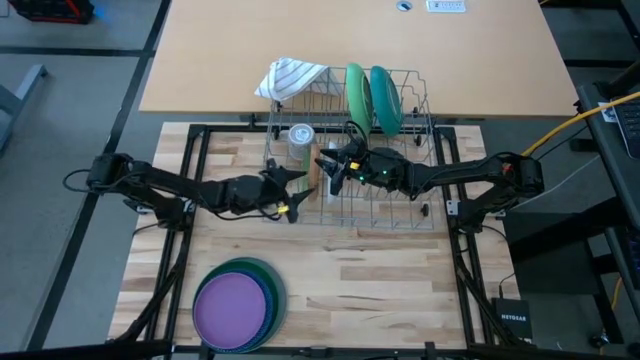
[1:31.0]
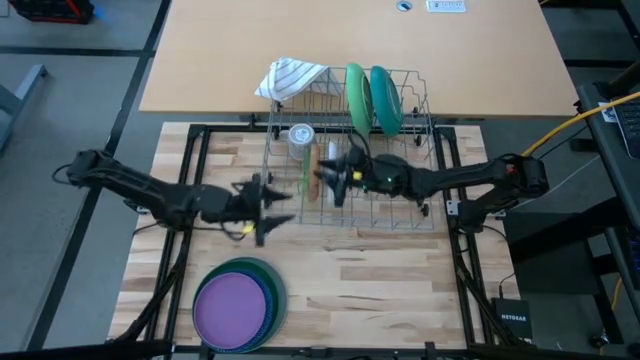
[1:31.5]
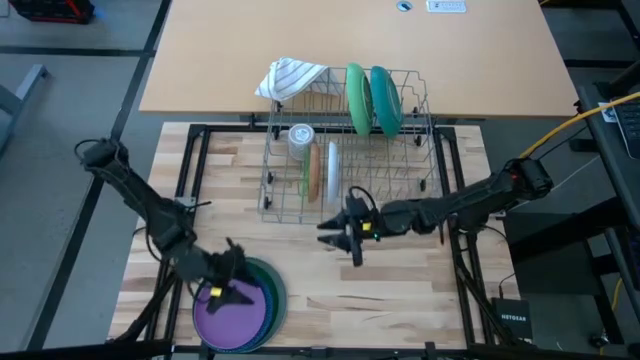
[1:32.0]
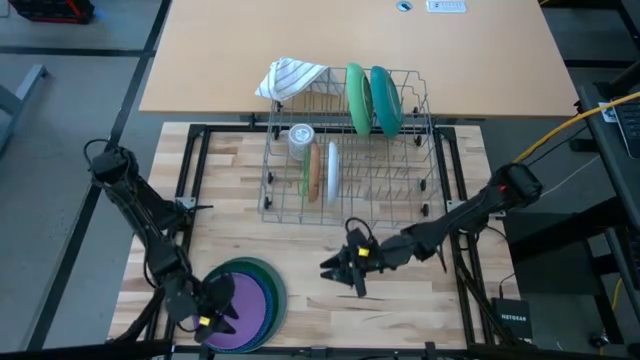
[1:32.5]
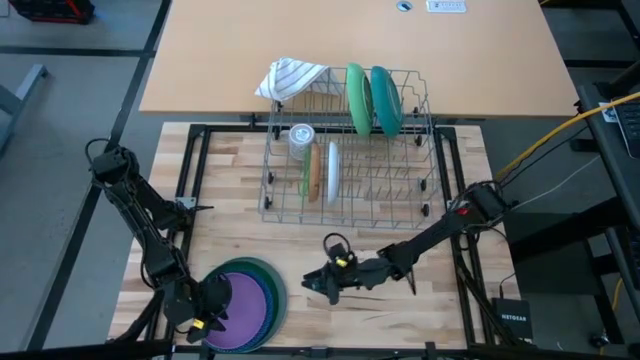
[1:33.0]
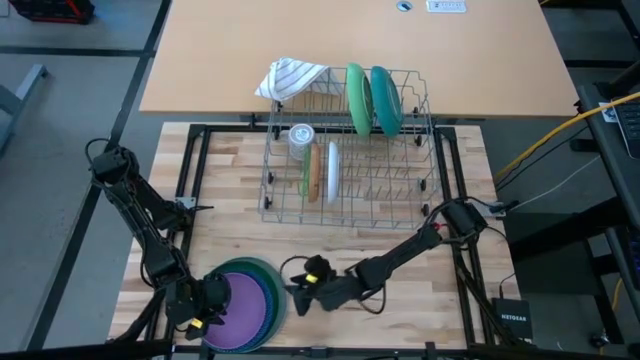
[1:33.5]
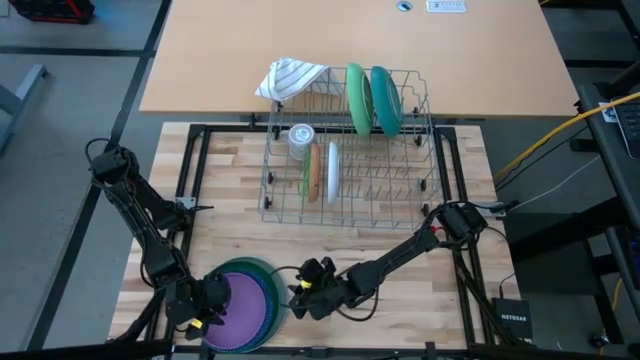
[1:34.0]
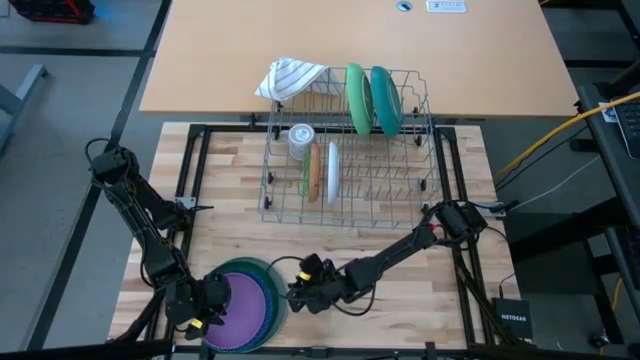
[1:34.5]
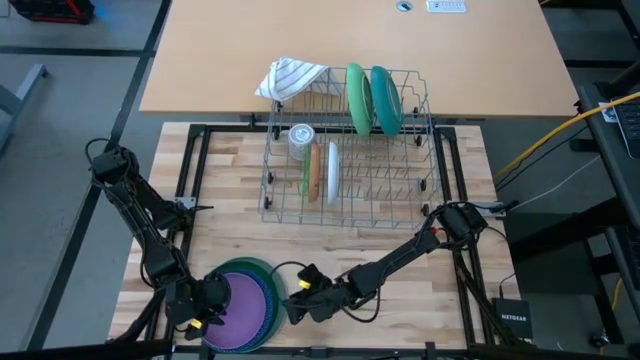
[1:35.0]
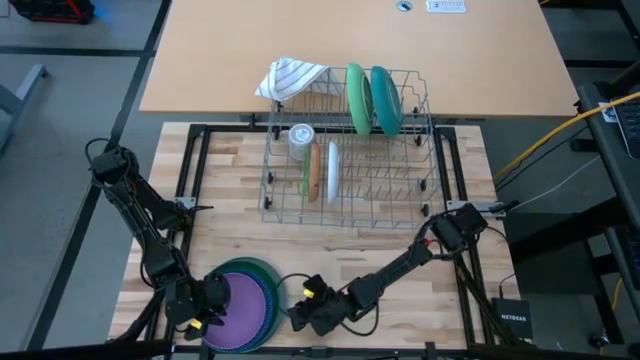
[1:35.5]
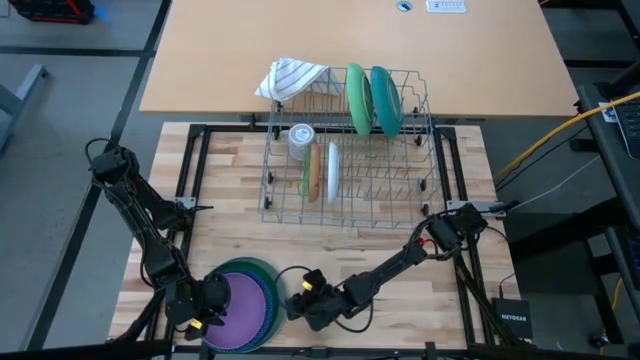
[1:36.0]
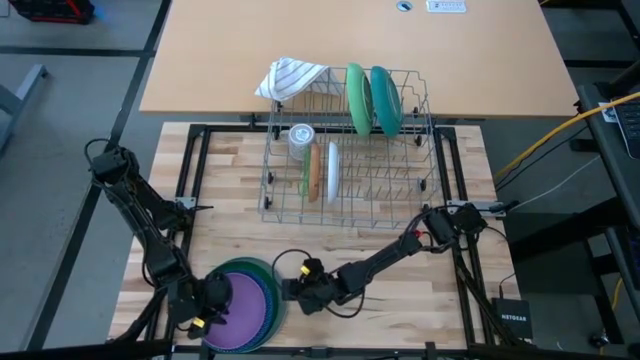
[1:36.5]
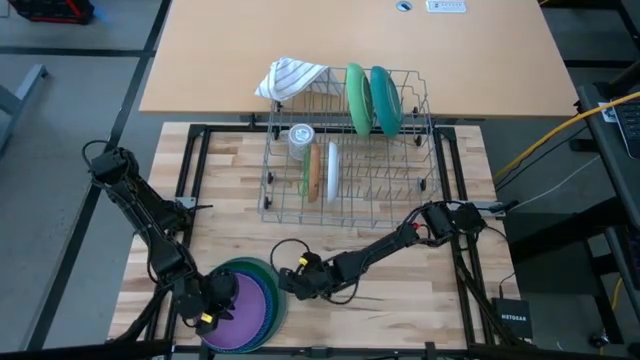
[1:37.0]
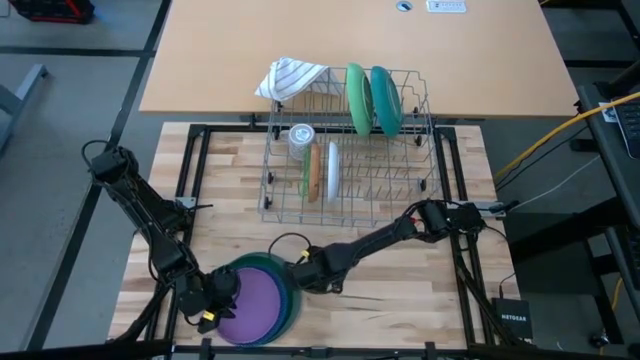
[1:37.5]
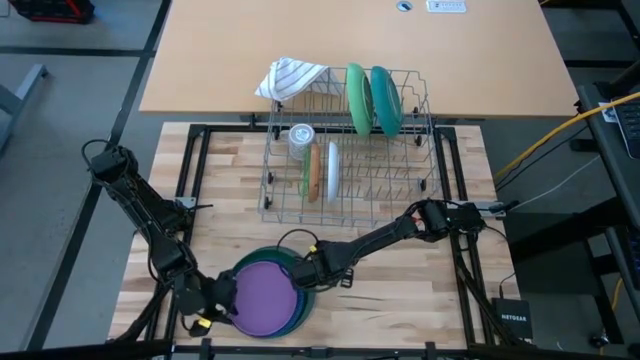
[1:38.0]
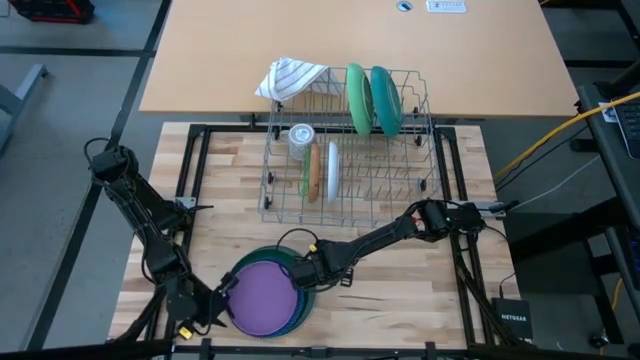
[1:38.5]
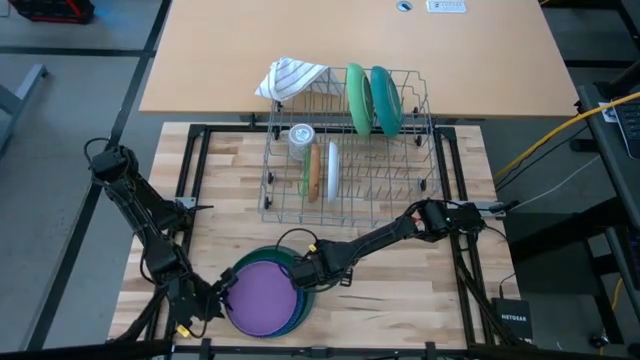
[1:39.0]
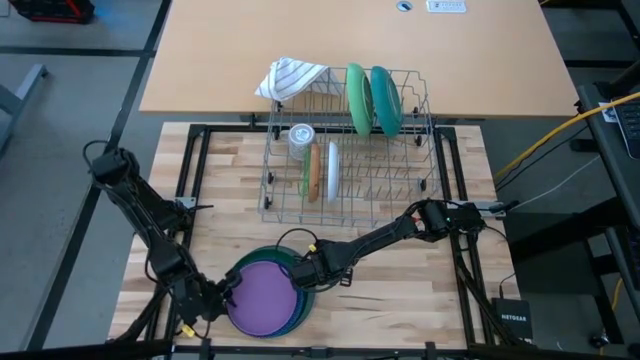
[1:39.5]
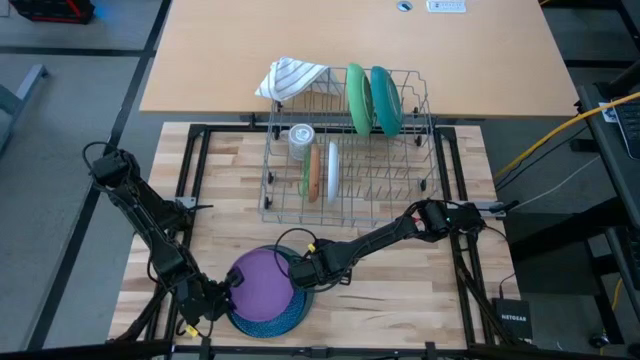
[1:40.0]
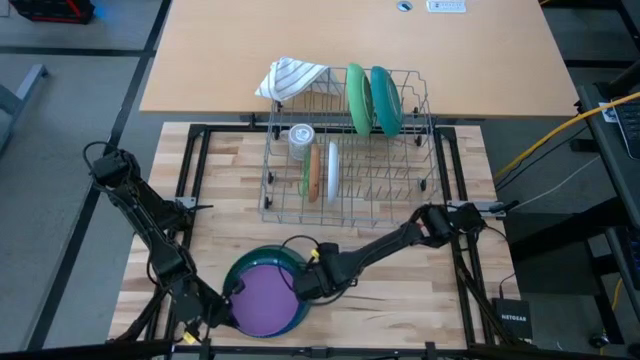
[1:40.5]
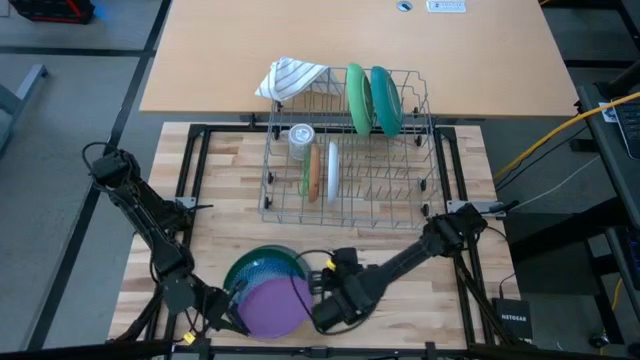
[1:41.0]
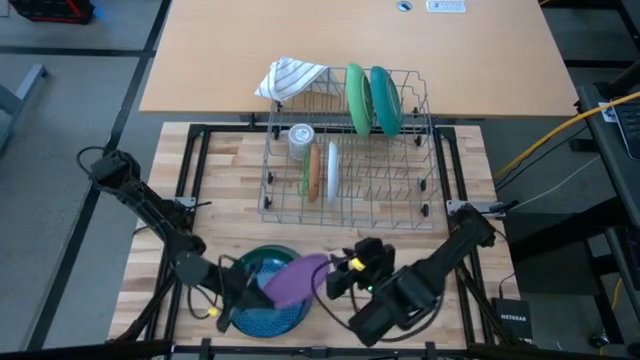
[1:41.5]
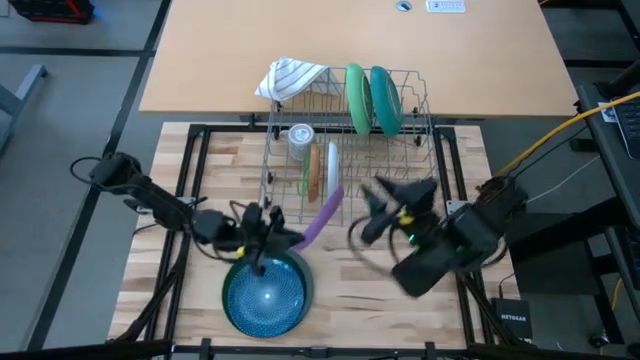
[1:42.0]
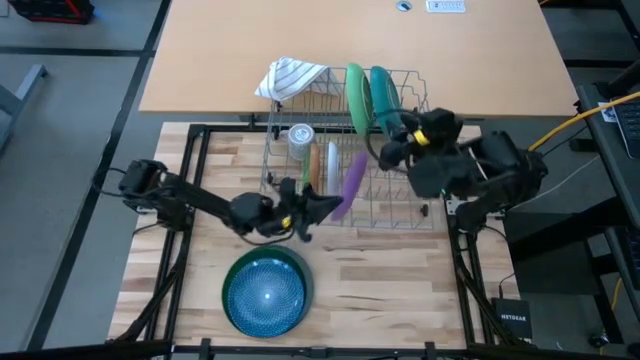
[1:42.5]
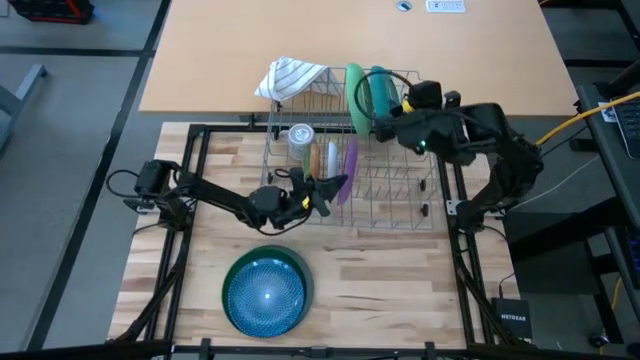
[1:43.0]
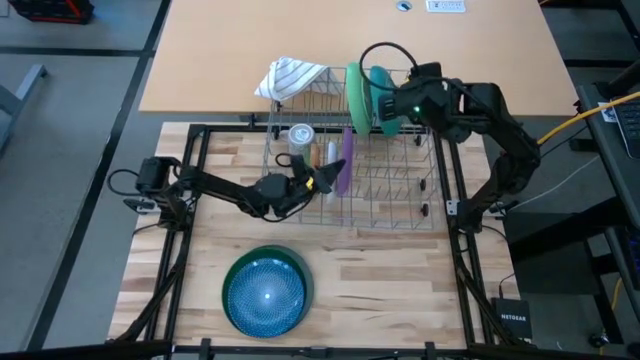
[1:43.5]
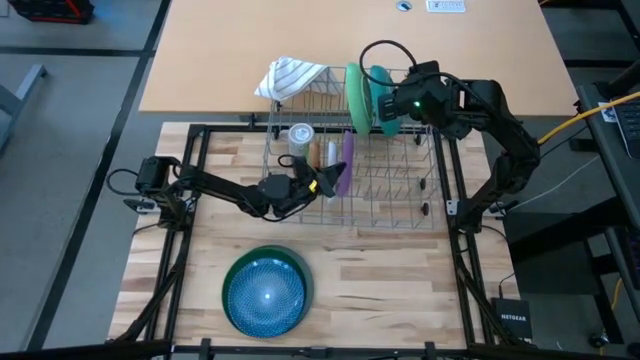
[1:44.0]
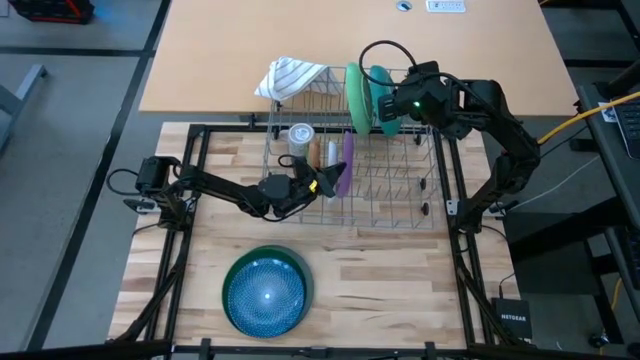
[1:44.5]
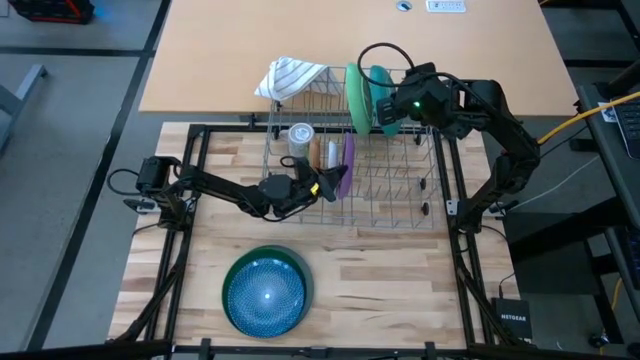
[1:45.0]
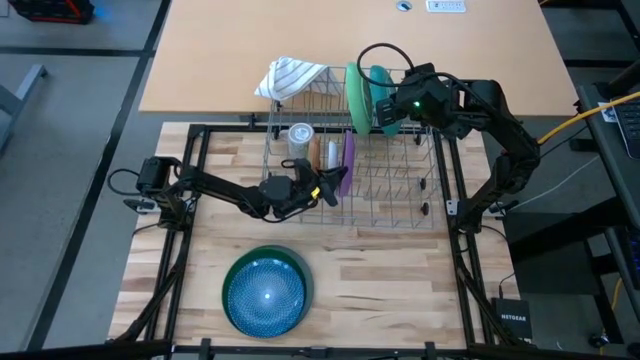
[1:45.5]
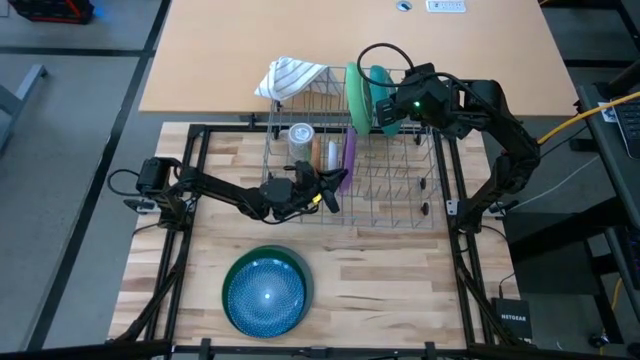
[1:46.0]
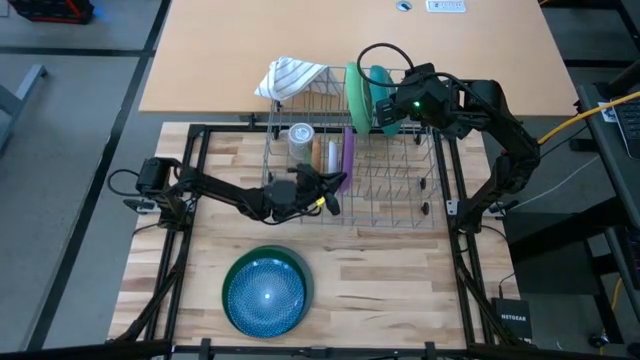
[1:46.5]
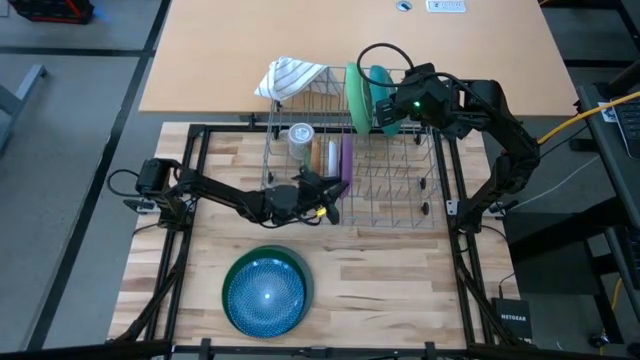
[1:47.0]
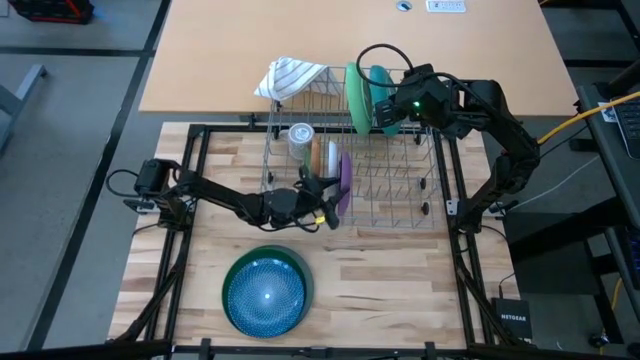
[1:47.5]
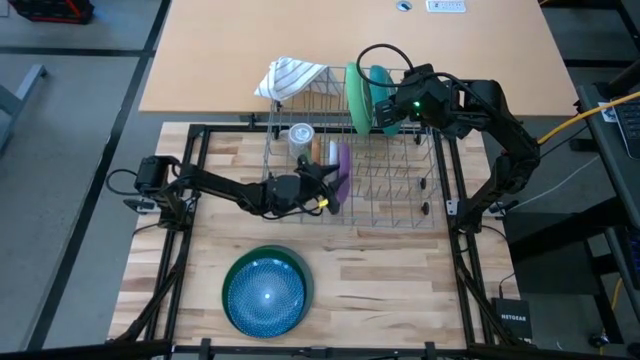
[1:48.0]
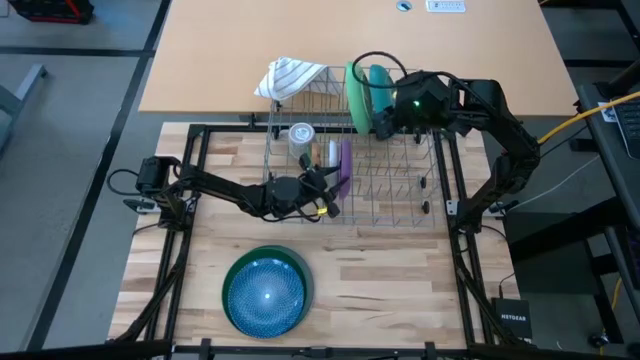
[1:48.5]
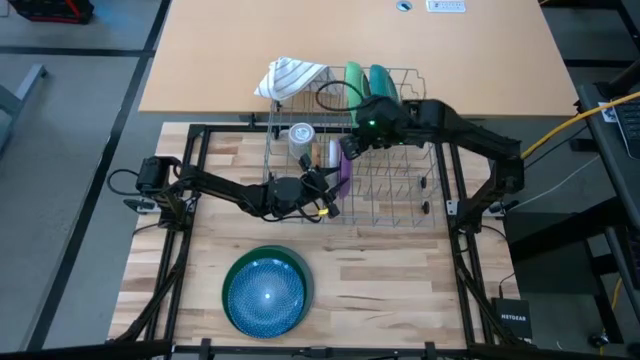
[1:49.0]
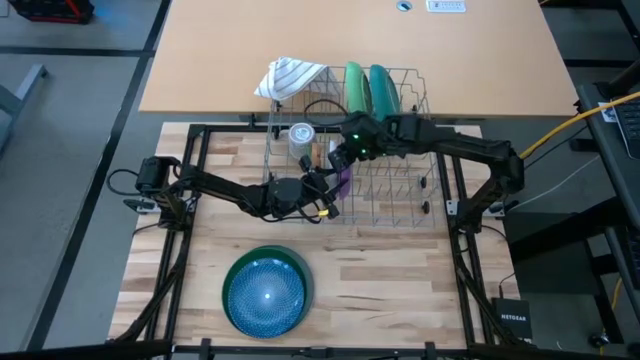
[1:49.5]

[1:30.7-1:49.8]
Task: Sort dishes
Put the purple plate in the dishwasher rack
